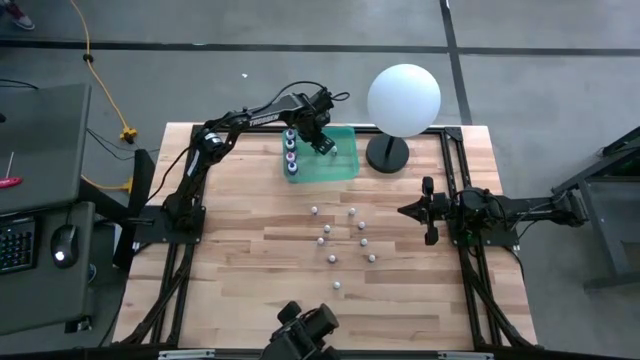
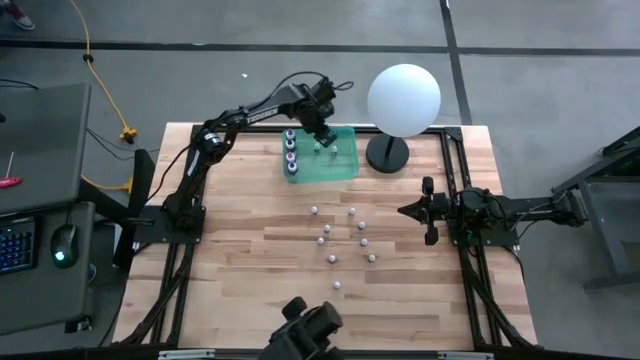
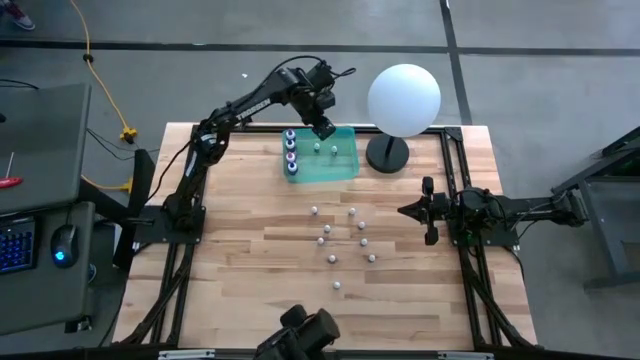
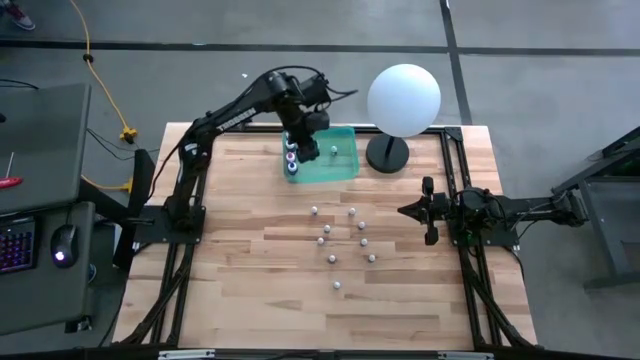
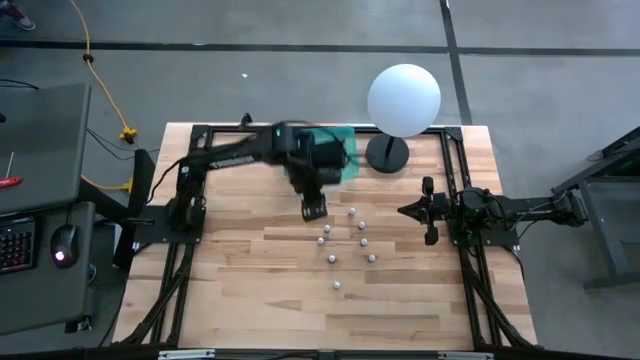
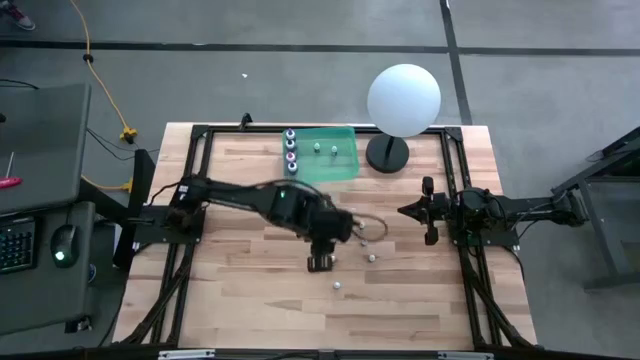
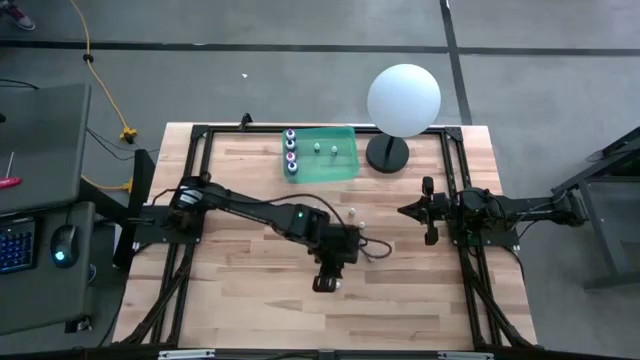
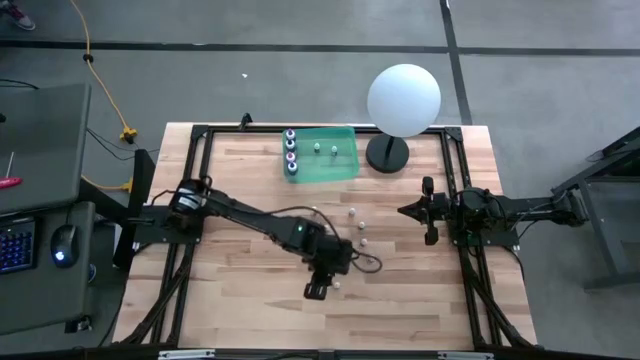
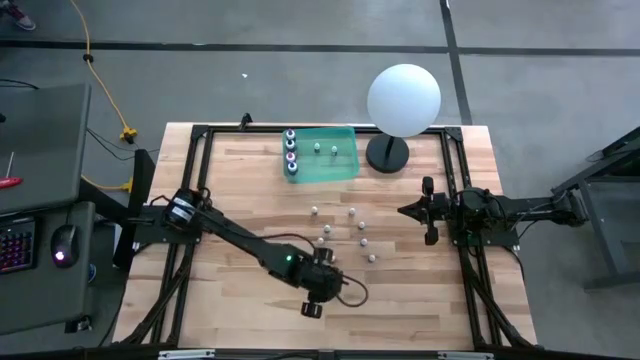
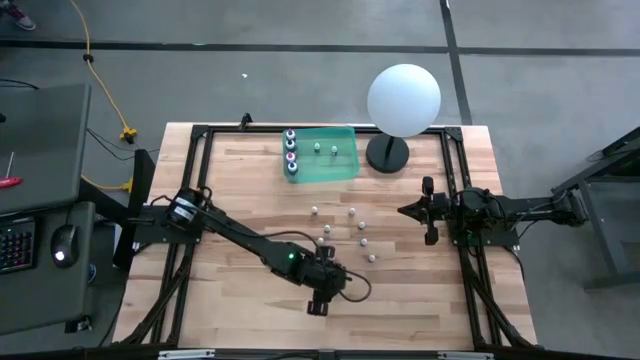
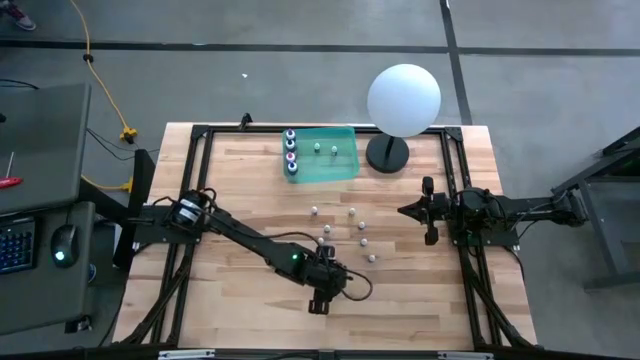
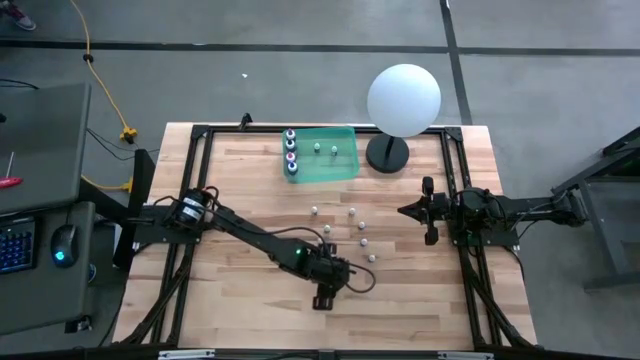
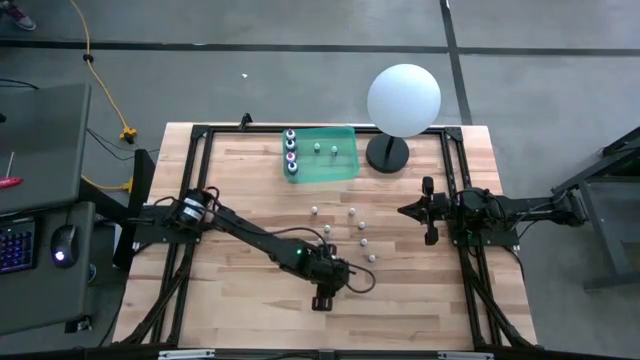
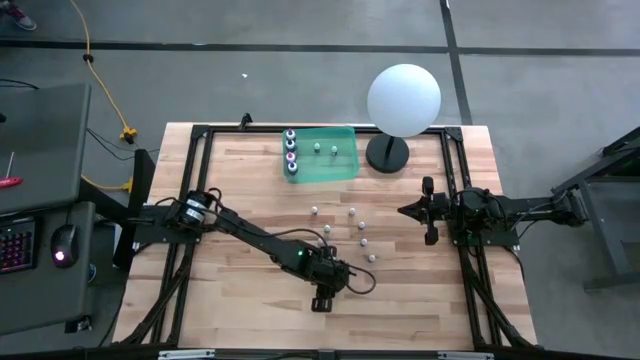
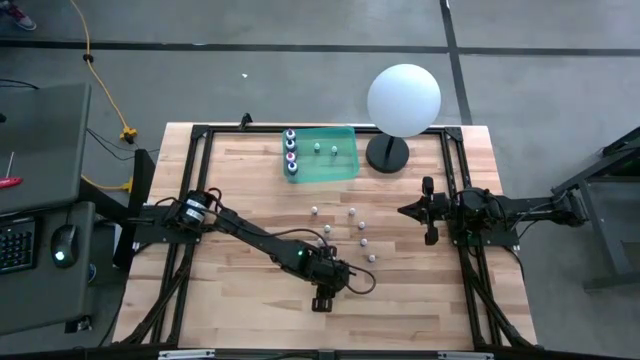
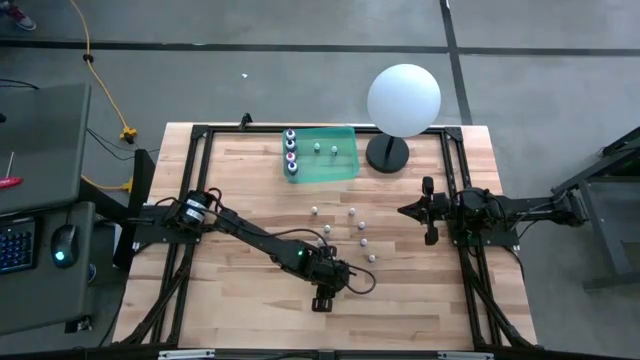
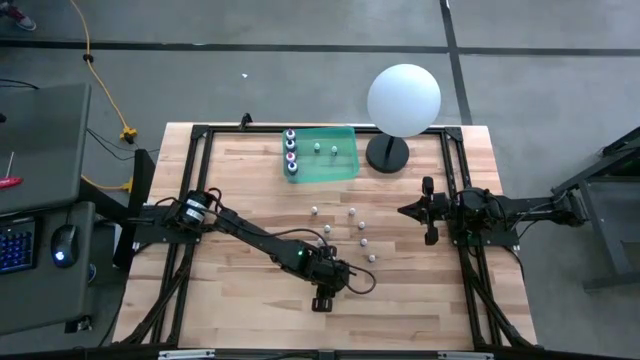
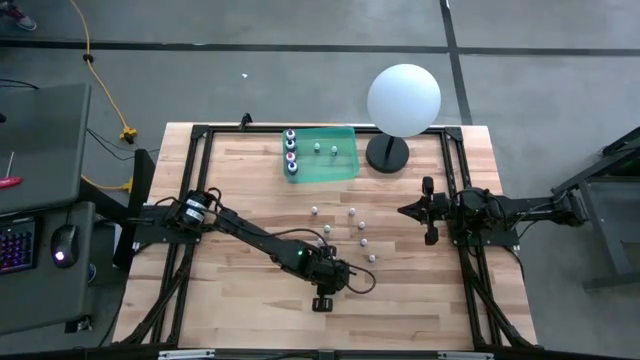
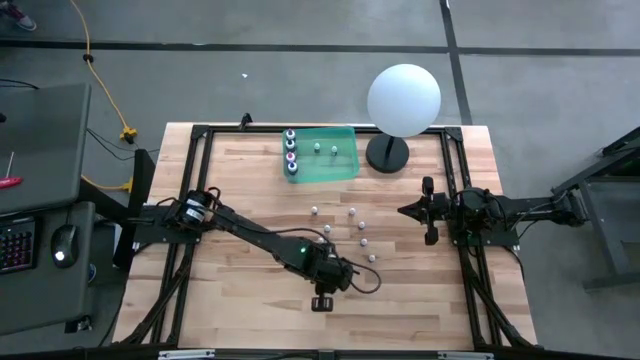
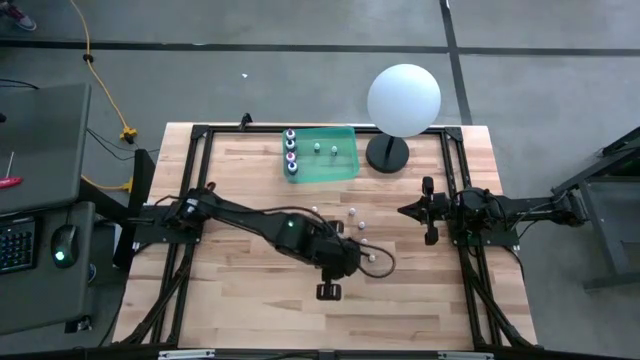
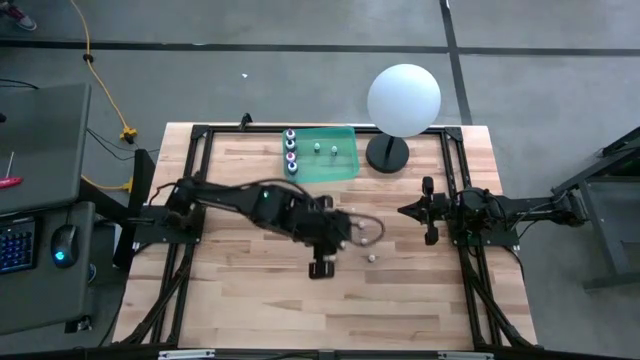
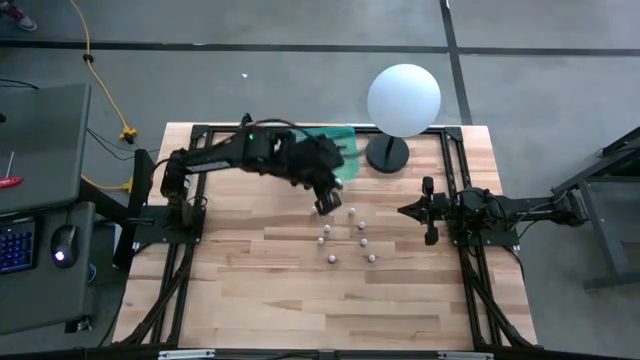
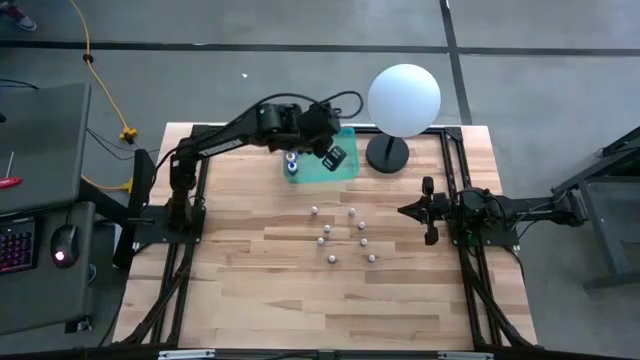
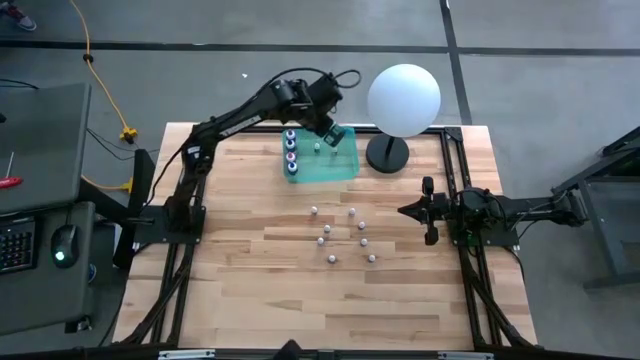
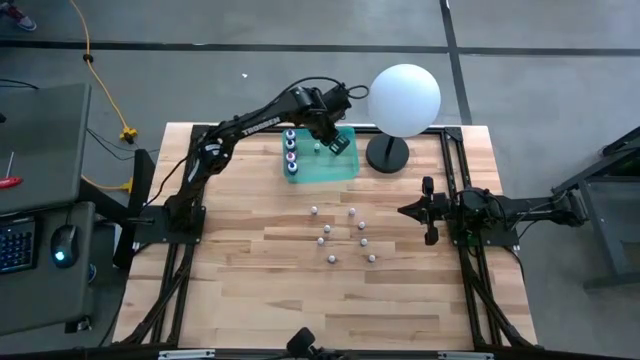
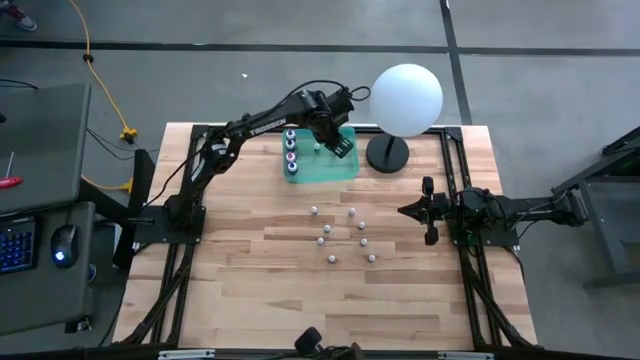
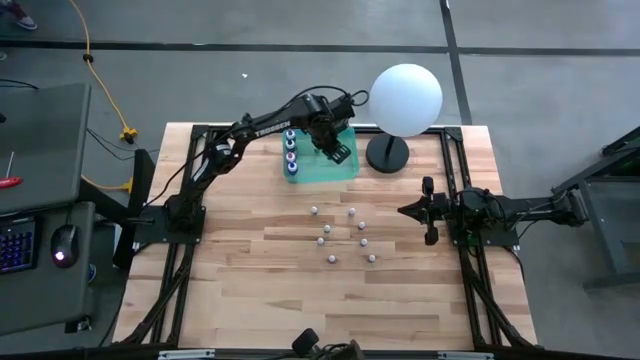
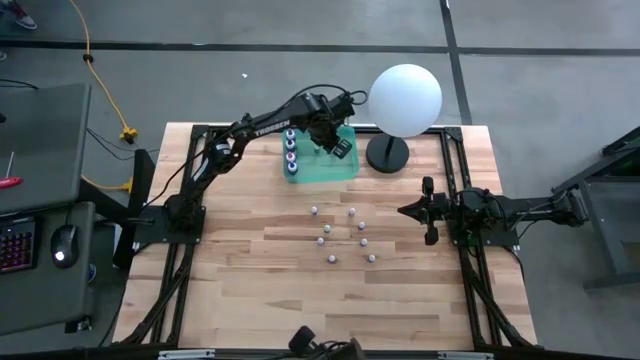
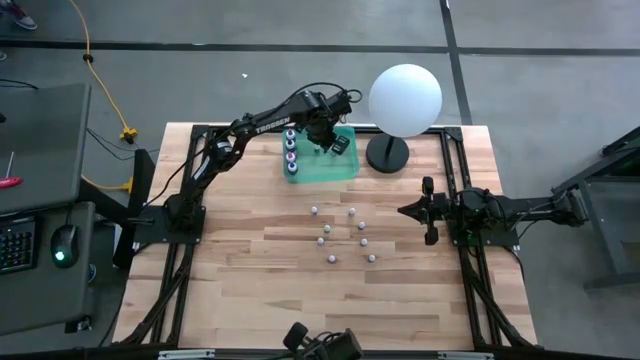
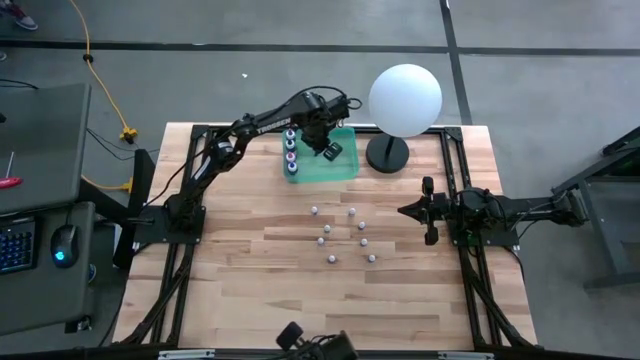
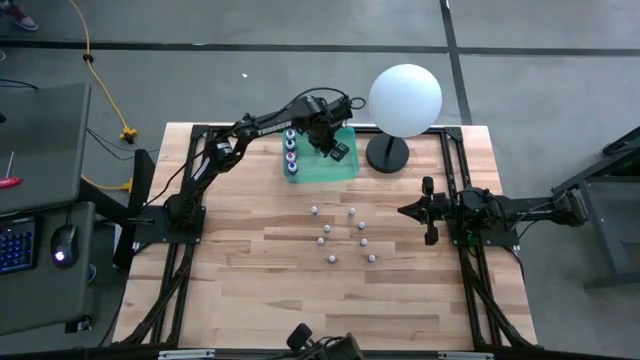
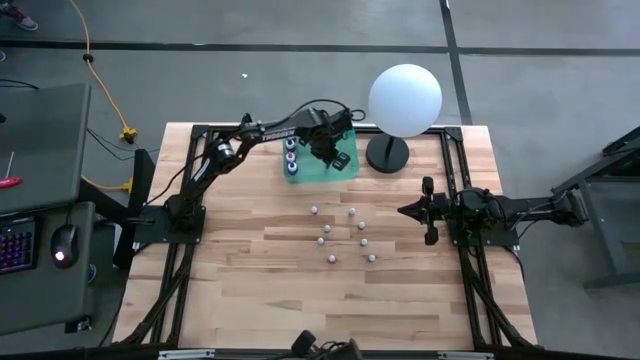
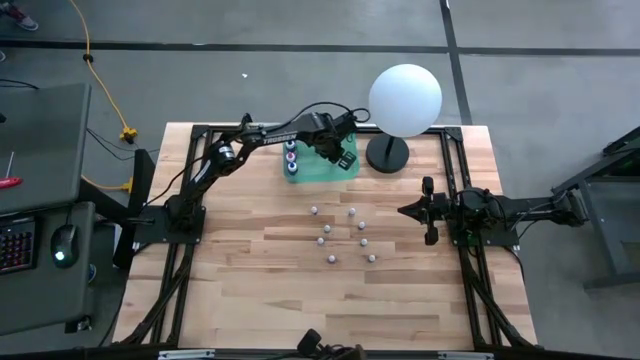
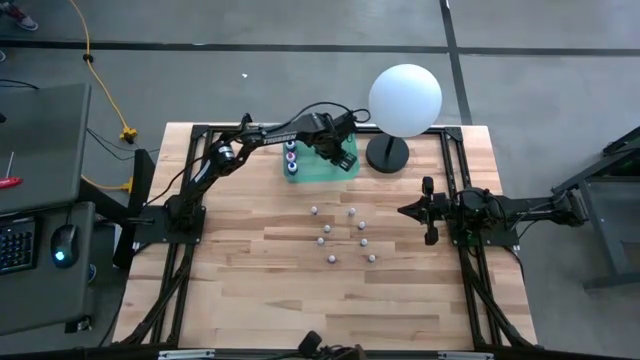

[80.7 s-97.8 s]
Task: Pick & Place food coloring
Put the small brown food coloring bottle into the green bin

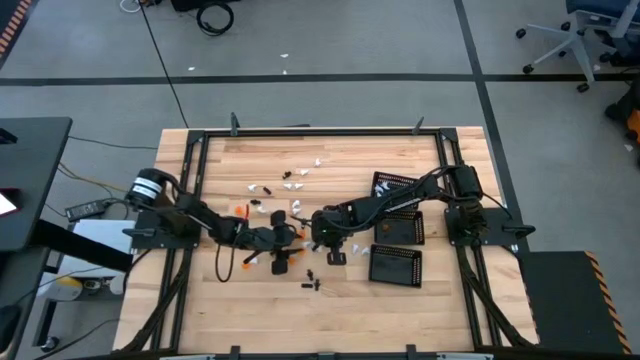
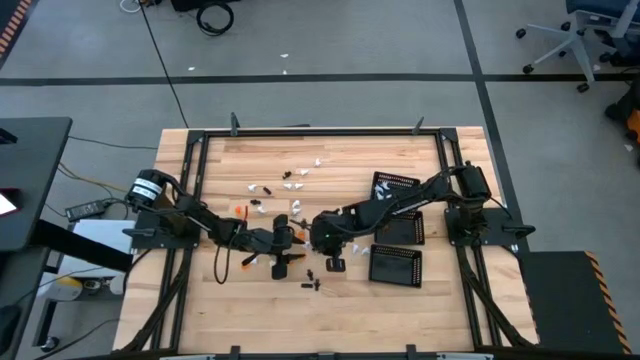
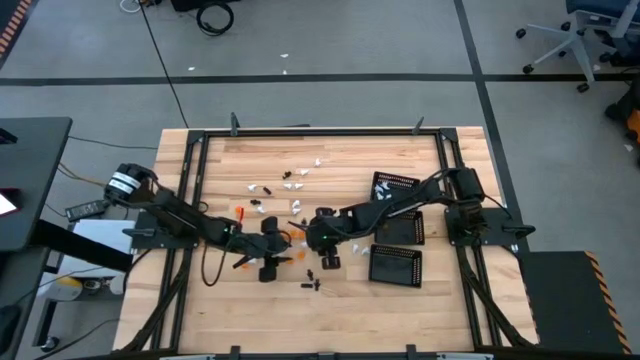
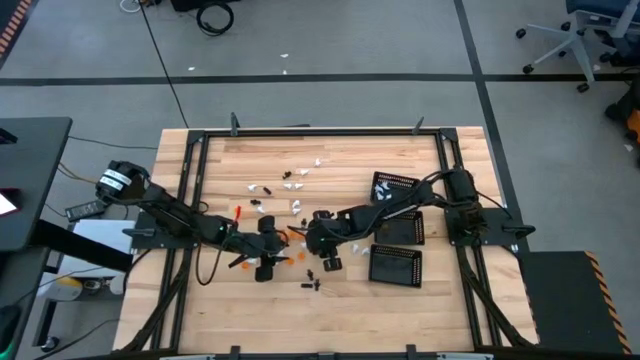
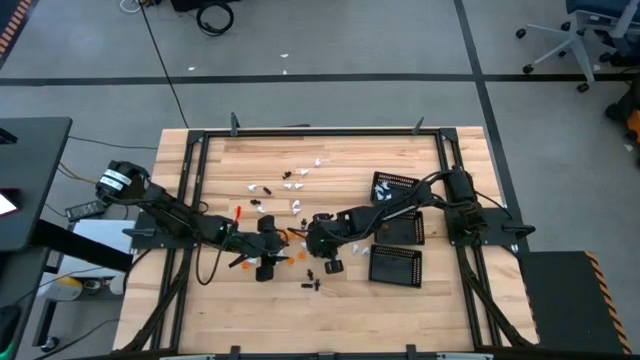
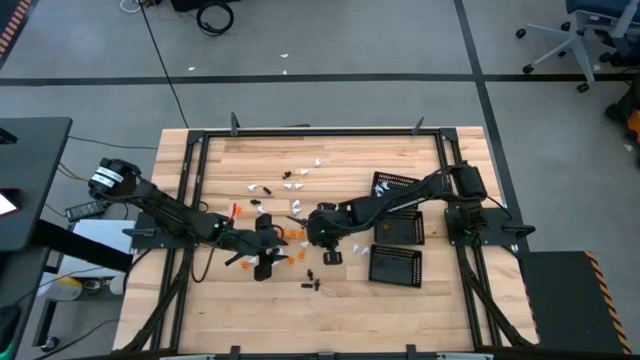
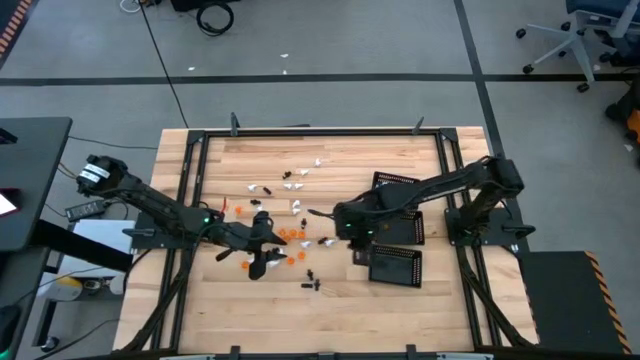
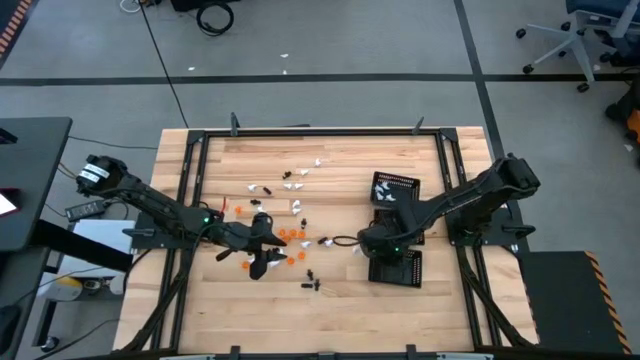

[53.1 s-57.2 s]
Task: Sort Halloween decoration
Put the black ghost toy into the bottom black bin

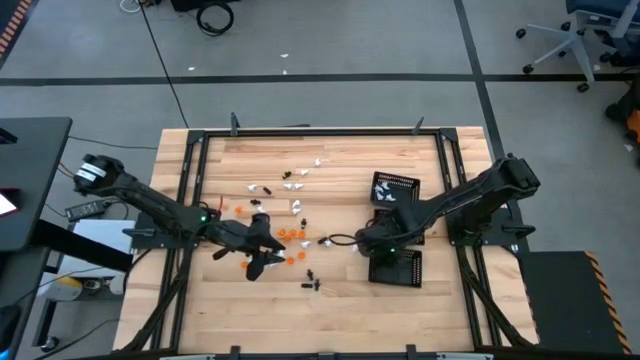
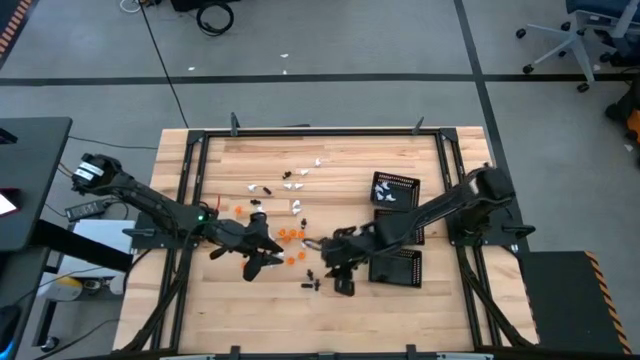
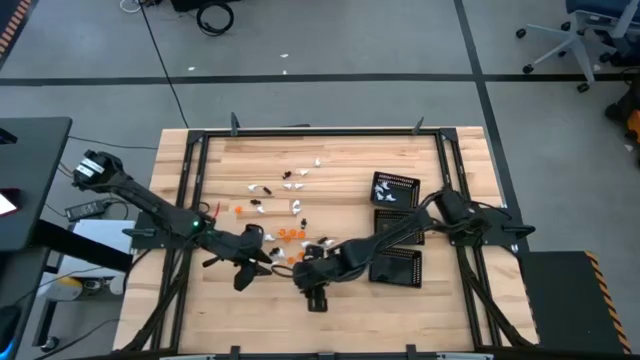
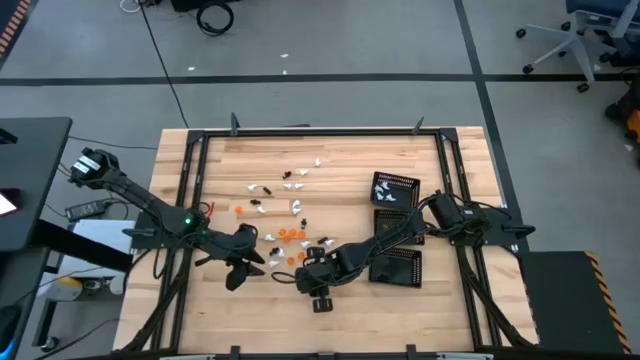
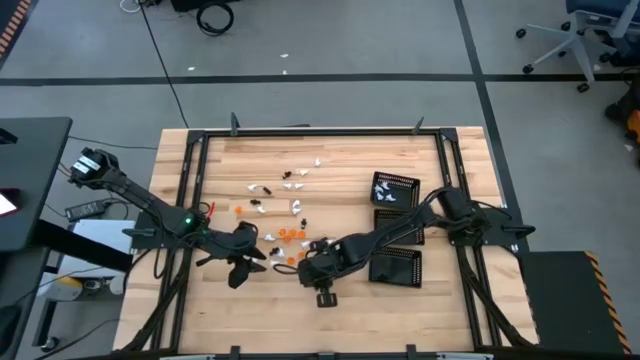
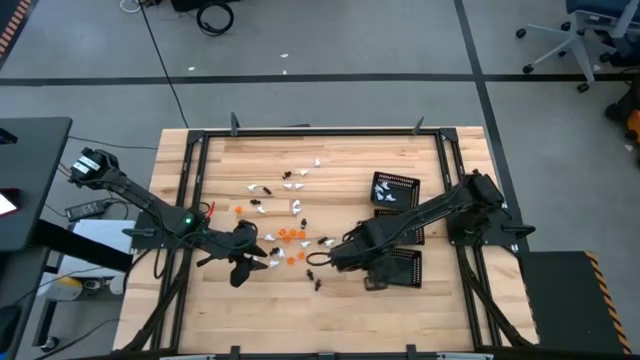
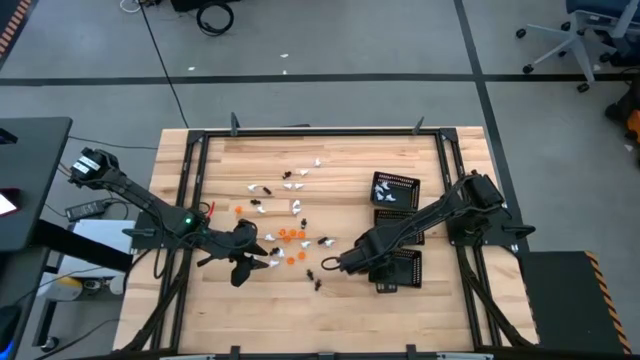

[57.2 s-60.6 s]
Put the black ghost toy into the bottom black bin
